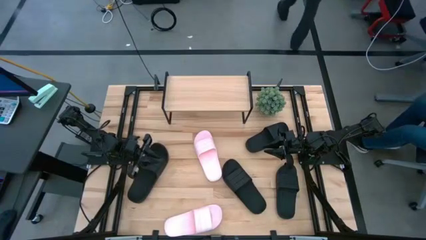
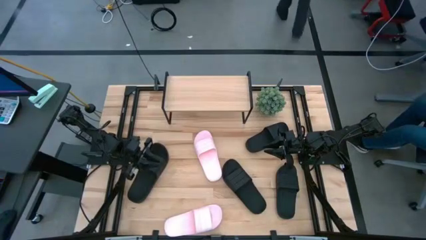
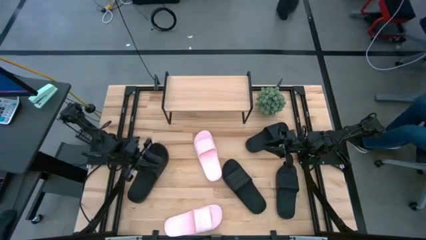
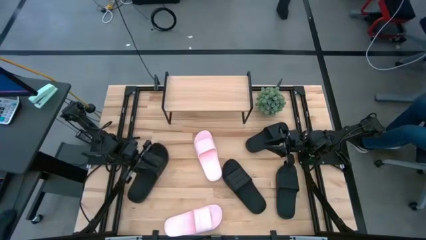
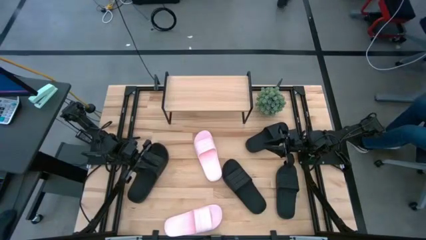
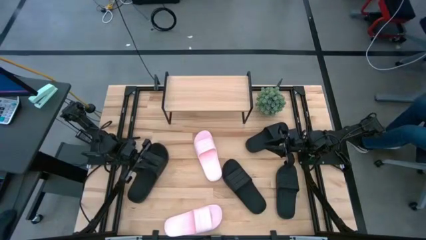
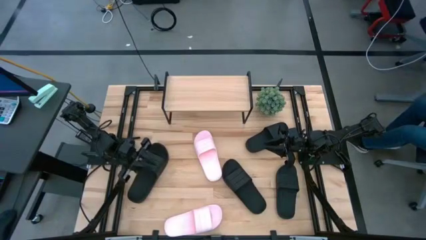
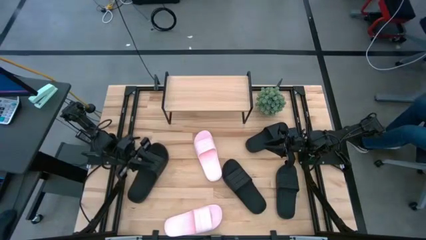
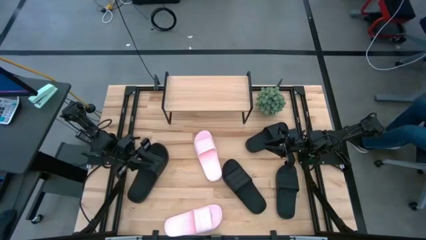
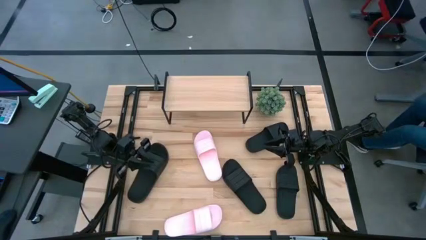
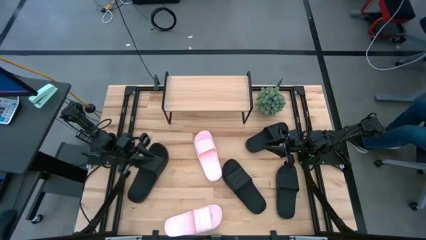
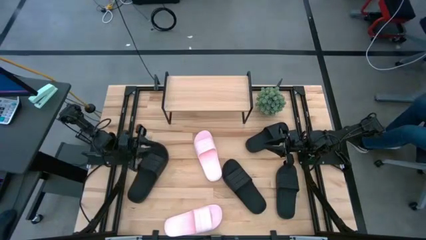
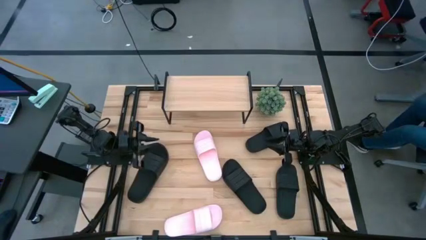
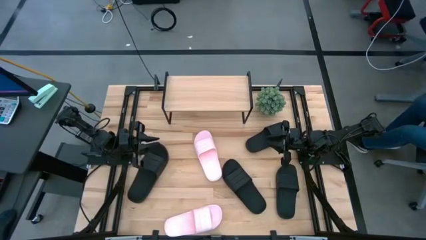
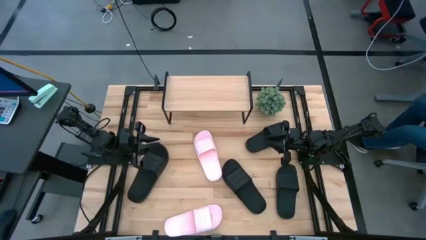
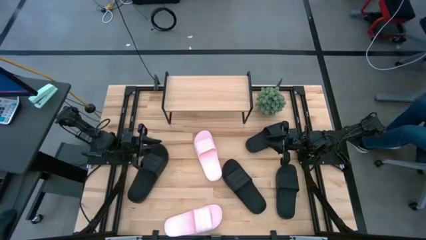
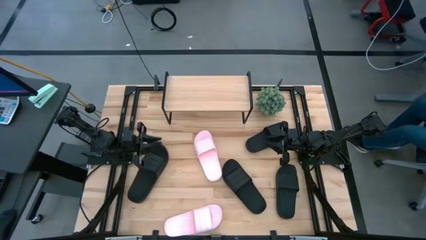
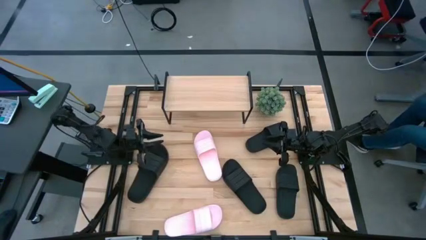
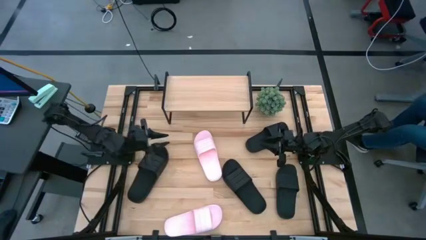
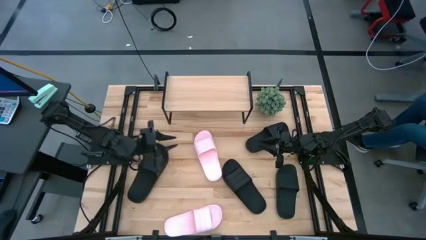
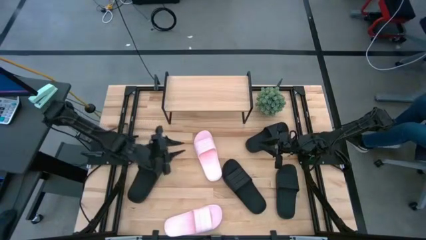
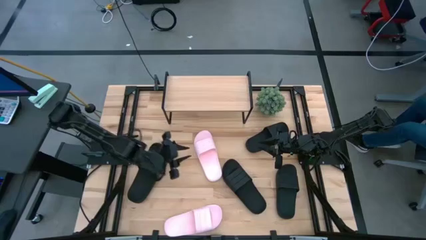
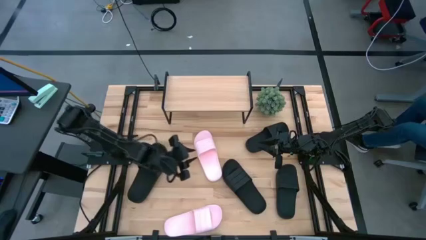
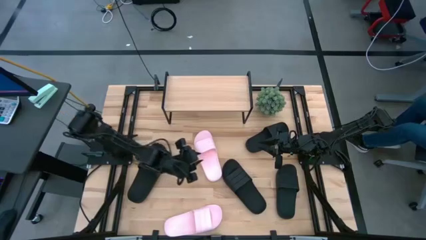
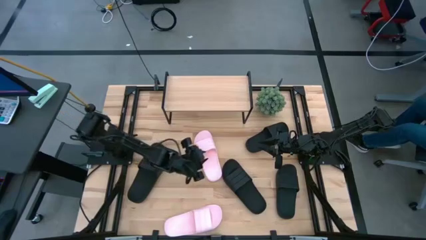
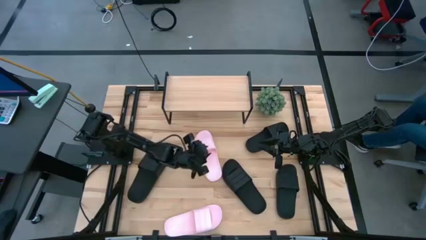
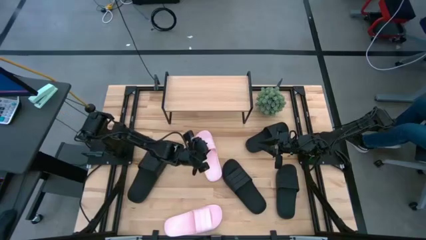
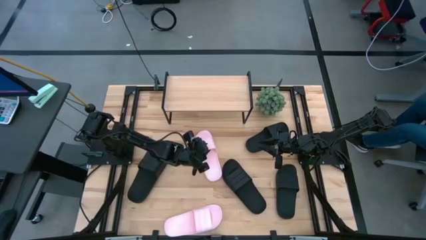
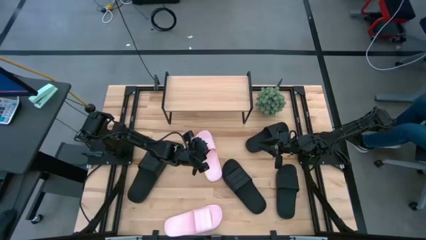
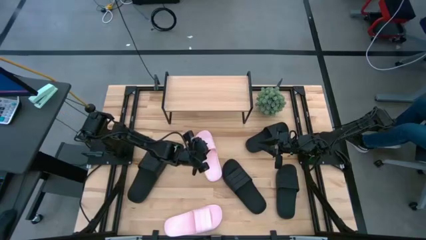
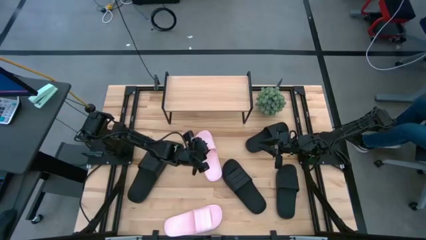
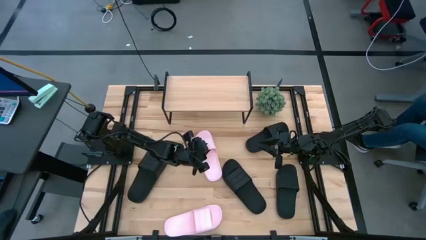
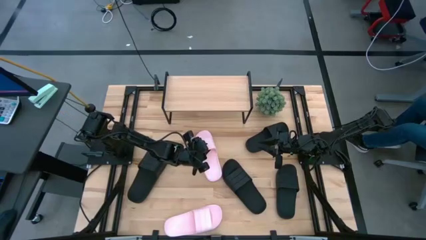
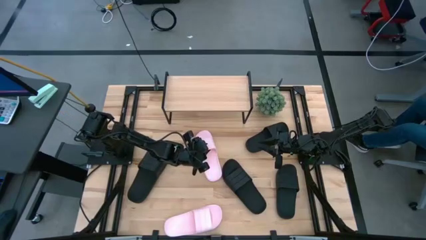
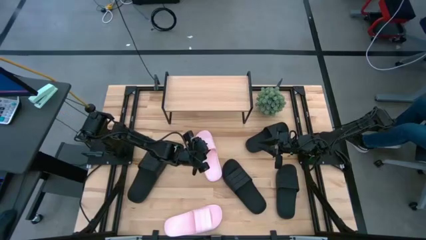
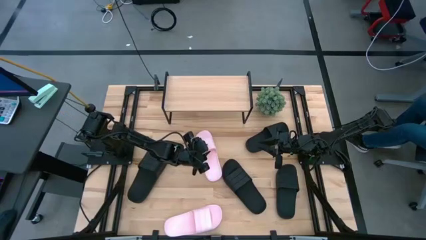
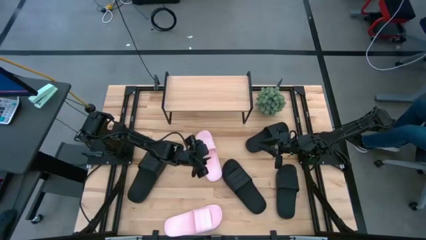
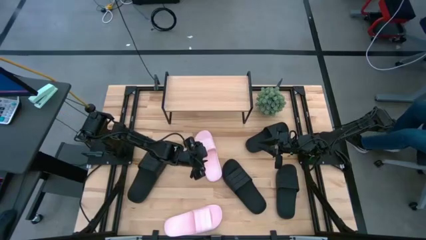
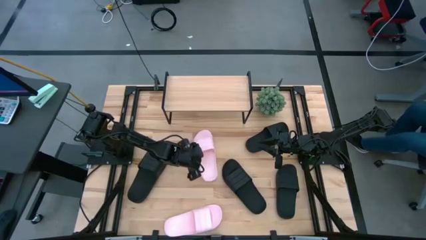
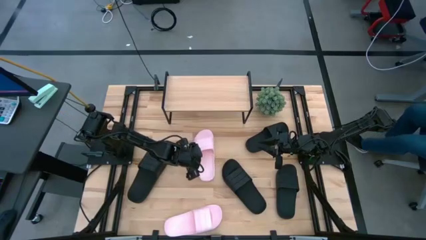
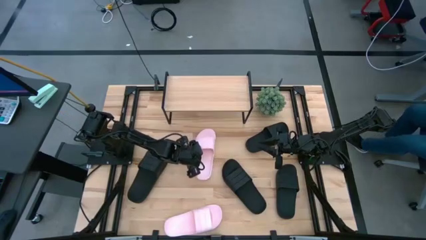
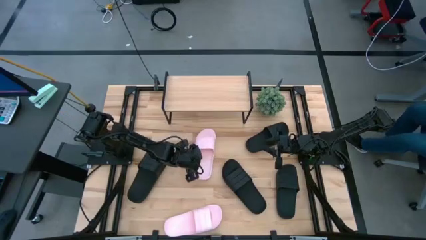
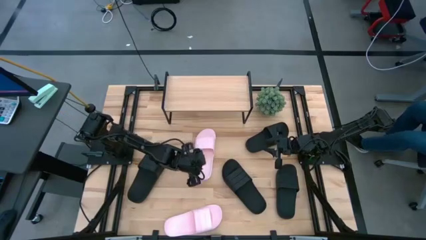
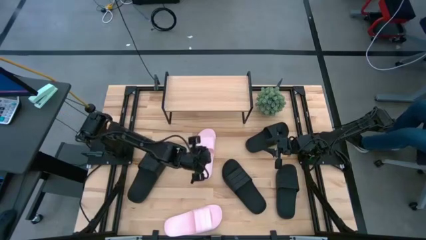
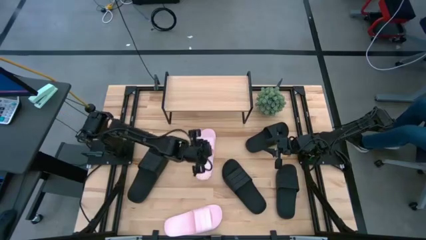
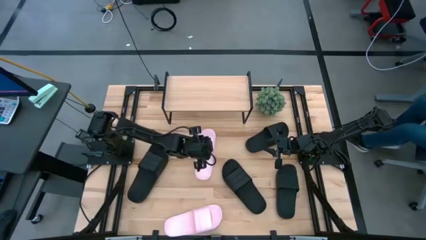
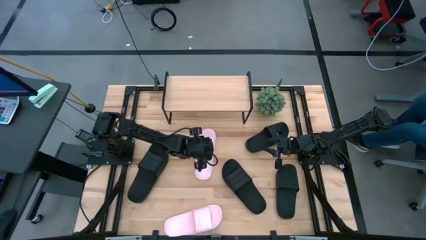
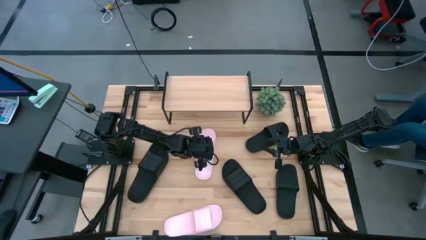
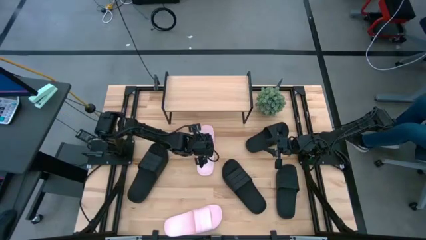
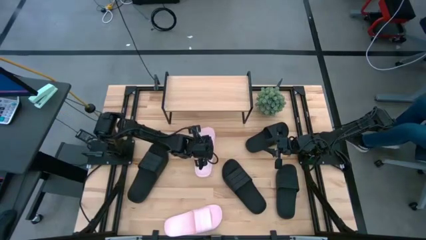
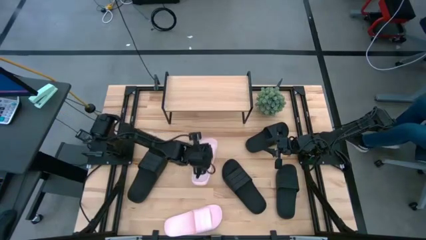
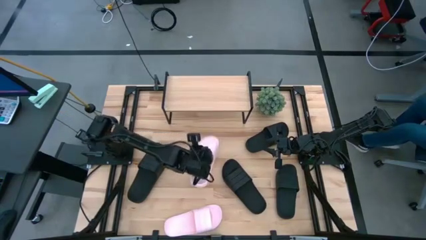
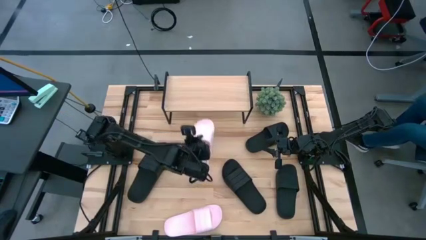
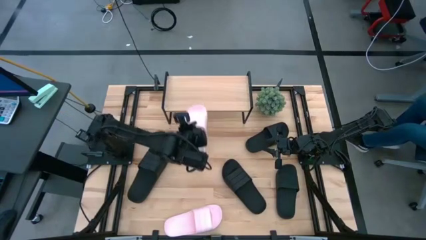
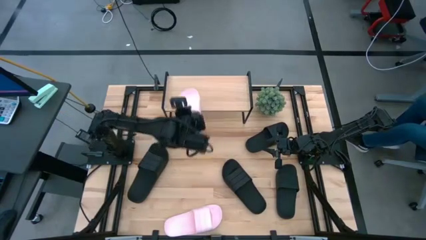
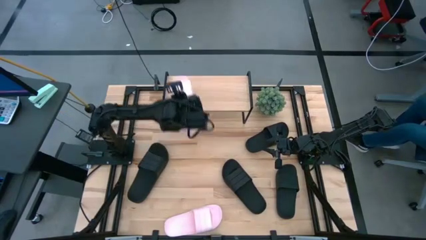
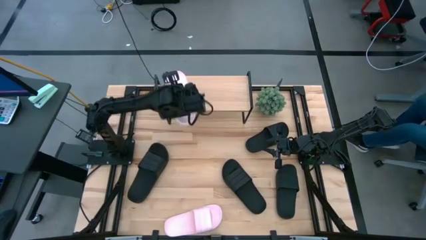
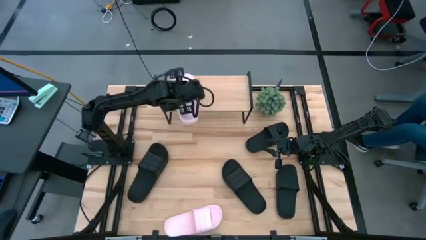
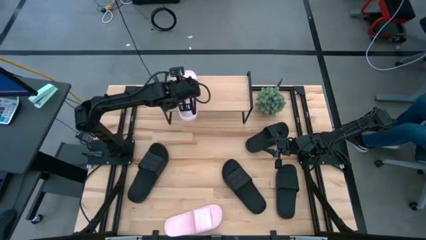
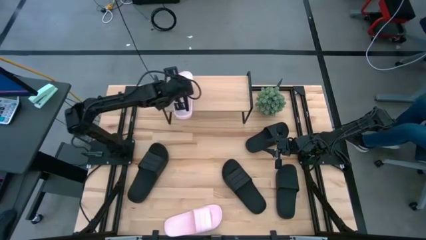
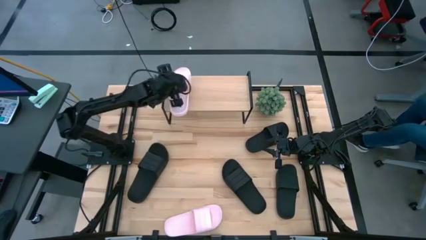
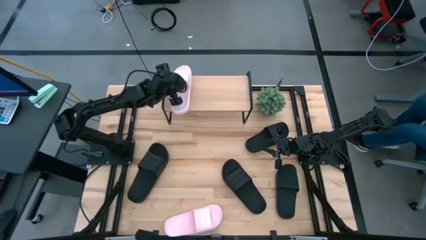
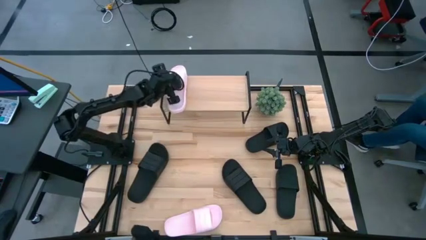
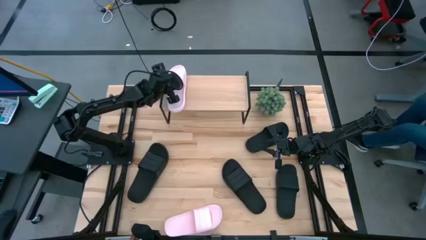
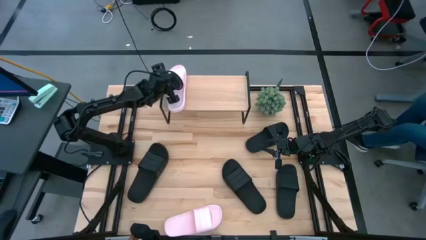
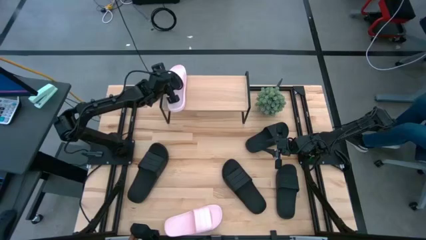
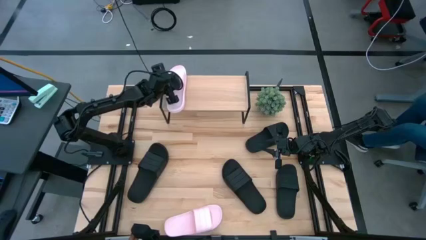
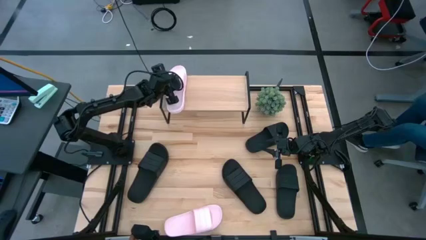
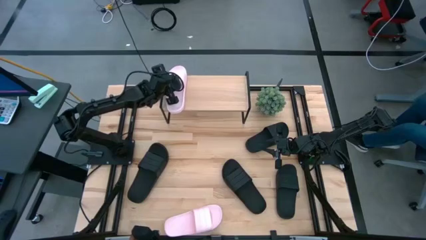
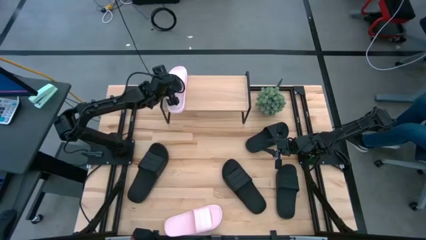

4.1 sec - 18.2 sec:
Task: Pick and place slides into the shelf
Put the top pink slipper on the shelf
